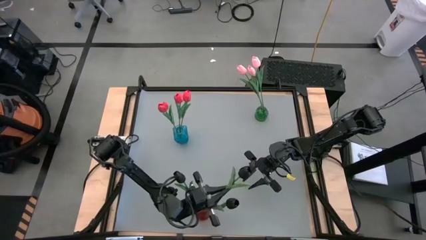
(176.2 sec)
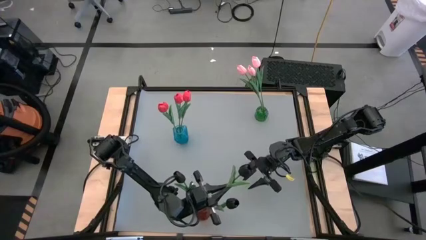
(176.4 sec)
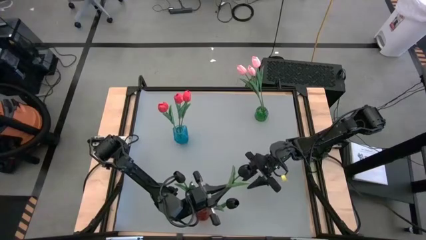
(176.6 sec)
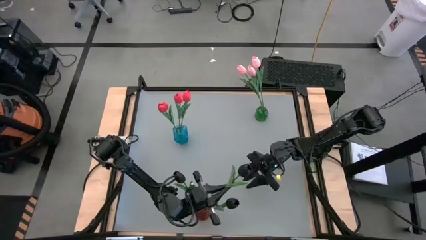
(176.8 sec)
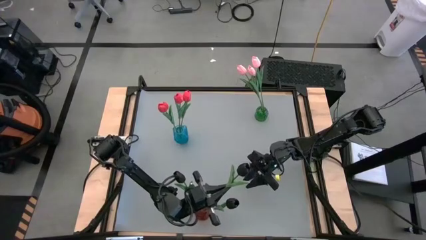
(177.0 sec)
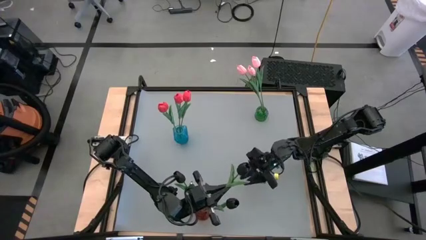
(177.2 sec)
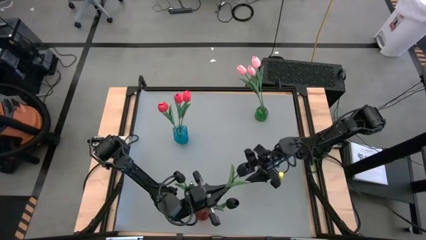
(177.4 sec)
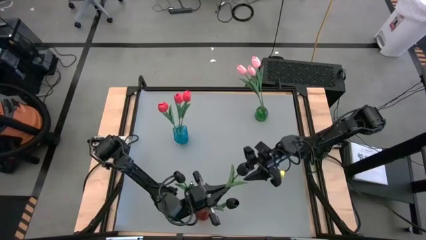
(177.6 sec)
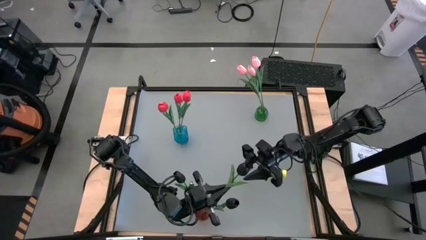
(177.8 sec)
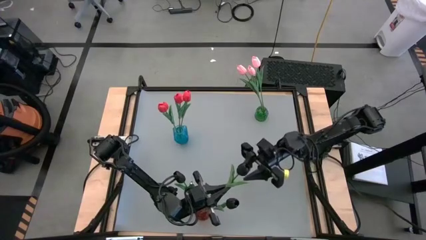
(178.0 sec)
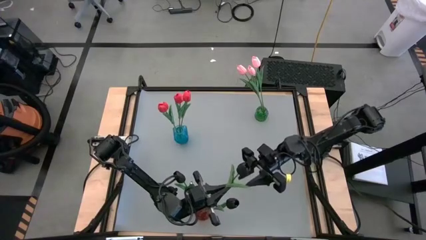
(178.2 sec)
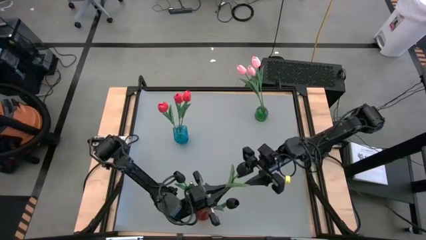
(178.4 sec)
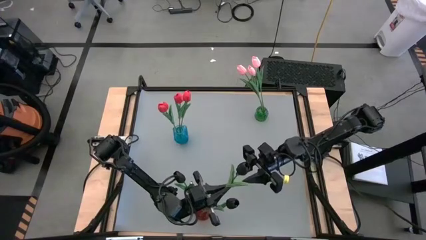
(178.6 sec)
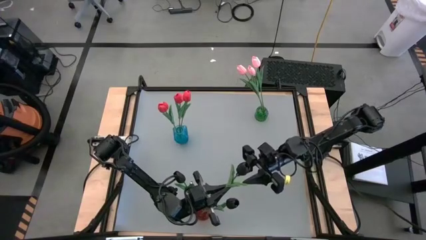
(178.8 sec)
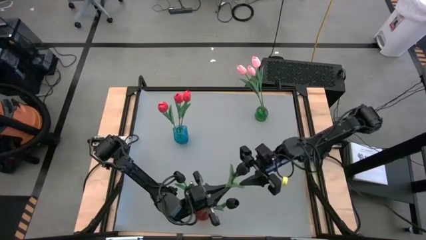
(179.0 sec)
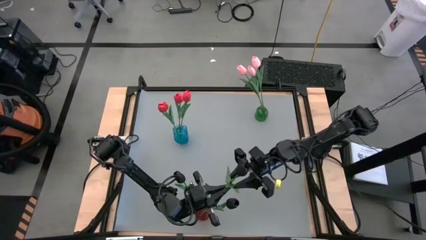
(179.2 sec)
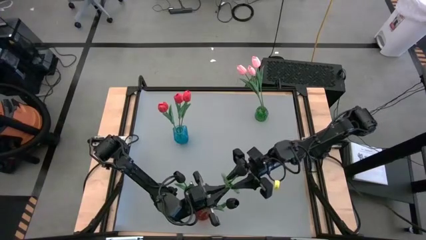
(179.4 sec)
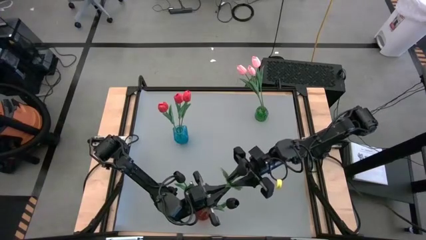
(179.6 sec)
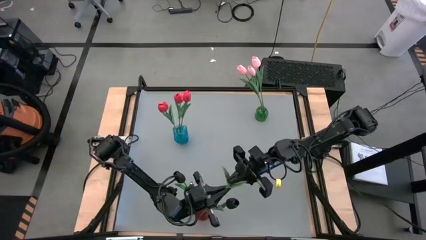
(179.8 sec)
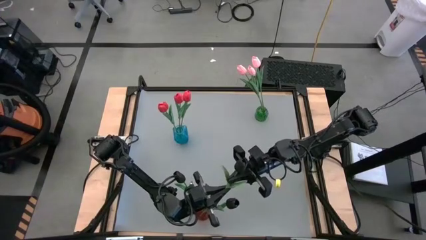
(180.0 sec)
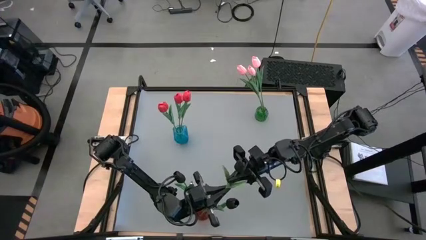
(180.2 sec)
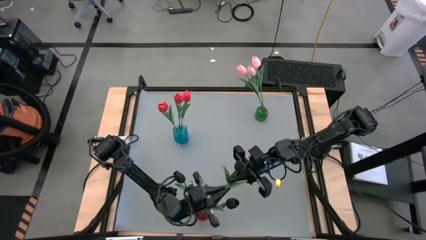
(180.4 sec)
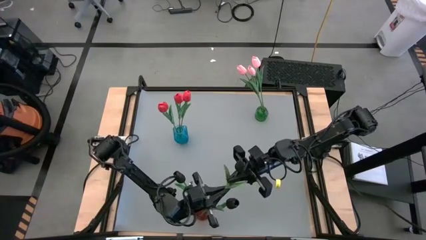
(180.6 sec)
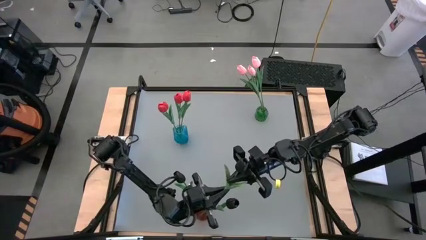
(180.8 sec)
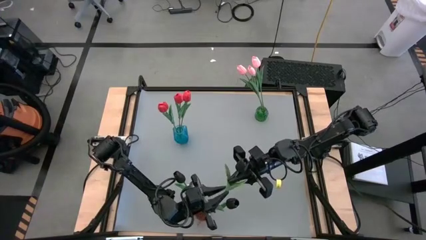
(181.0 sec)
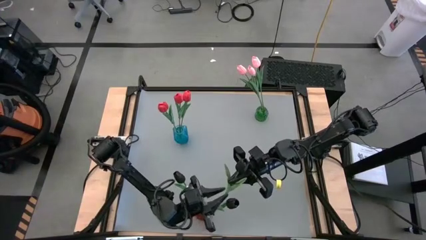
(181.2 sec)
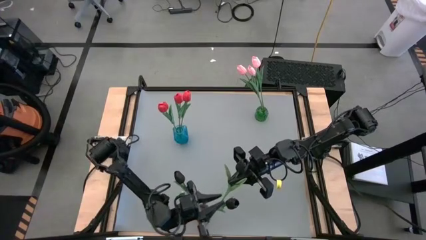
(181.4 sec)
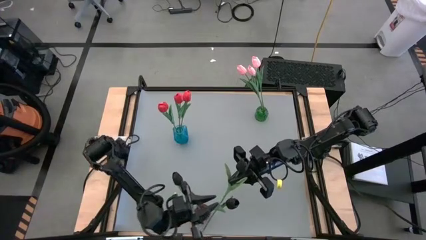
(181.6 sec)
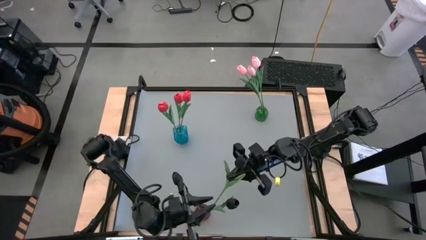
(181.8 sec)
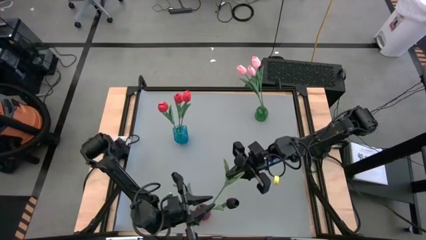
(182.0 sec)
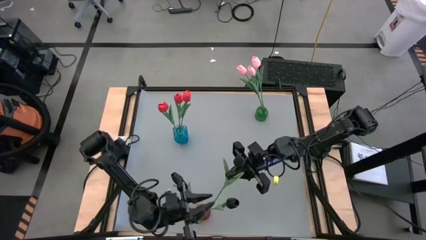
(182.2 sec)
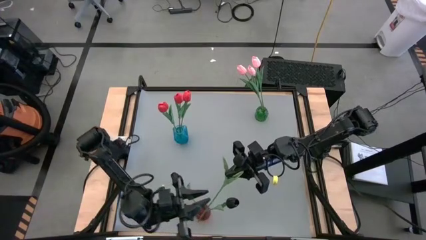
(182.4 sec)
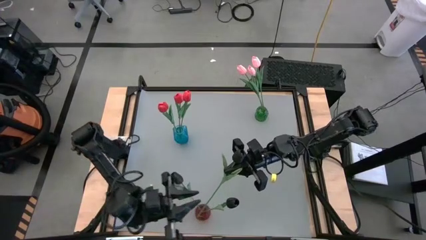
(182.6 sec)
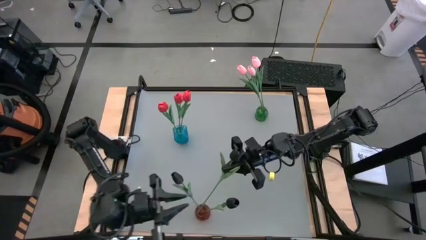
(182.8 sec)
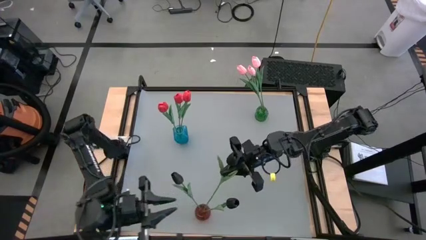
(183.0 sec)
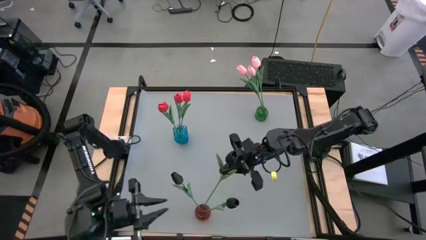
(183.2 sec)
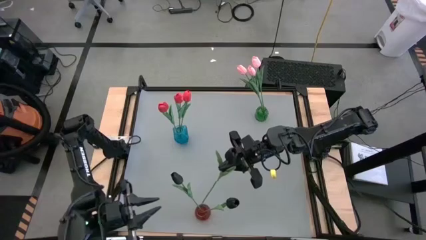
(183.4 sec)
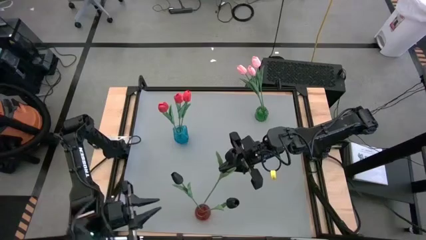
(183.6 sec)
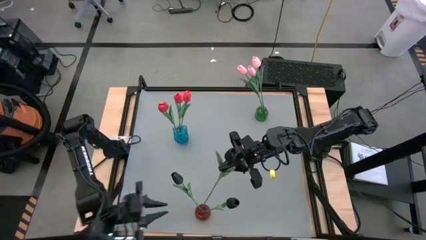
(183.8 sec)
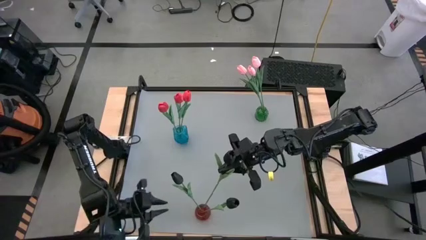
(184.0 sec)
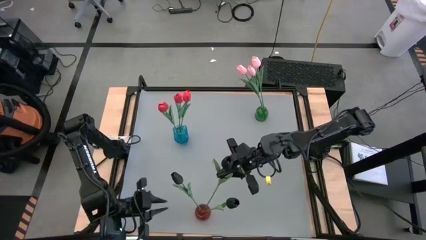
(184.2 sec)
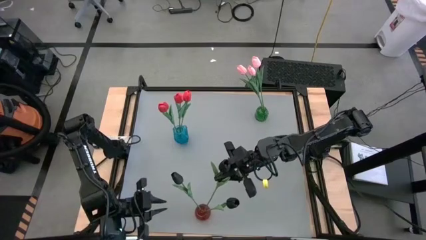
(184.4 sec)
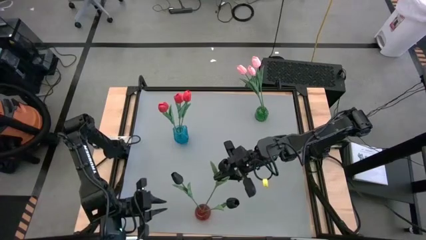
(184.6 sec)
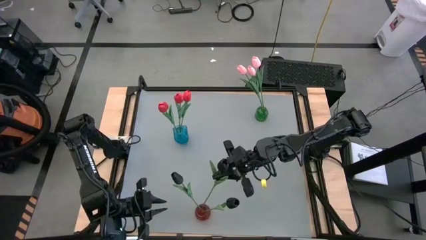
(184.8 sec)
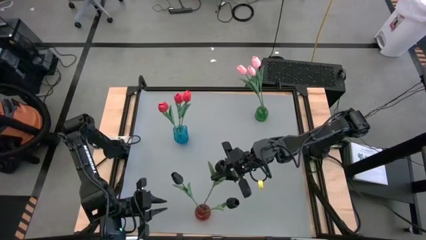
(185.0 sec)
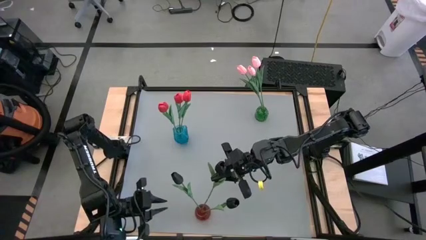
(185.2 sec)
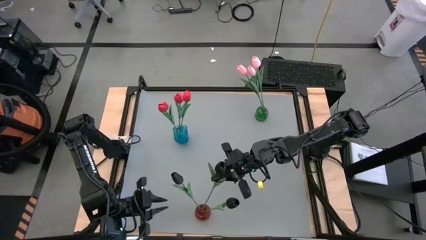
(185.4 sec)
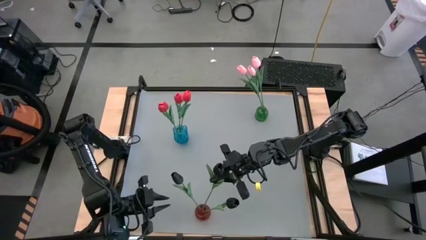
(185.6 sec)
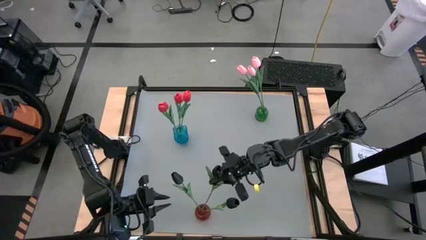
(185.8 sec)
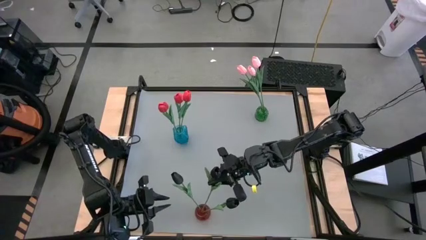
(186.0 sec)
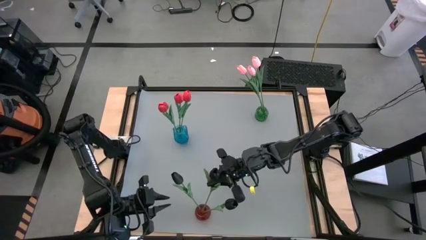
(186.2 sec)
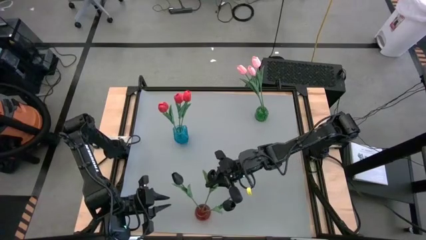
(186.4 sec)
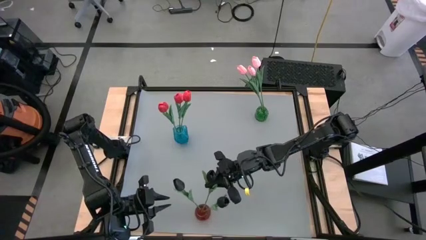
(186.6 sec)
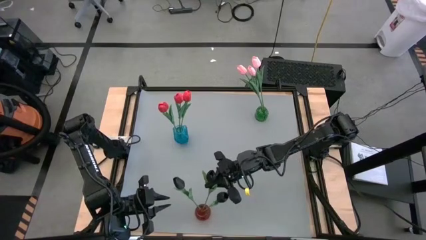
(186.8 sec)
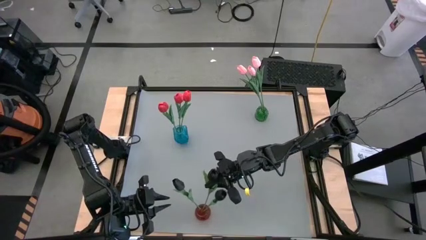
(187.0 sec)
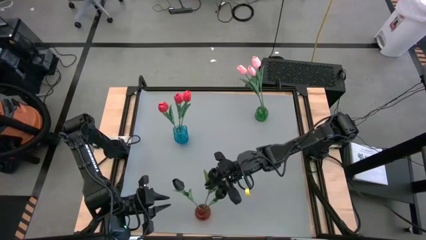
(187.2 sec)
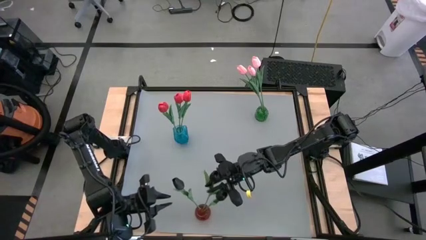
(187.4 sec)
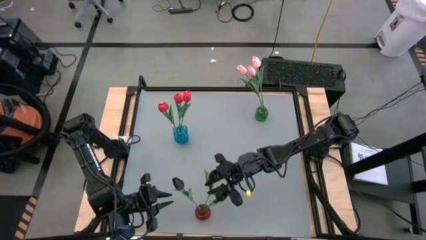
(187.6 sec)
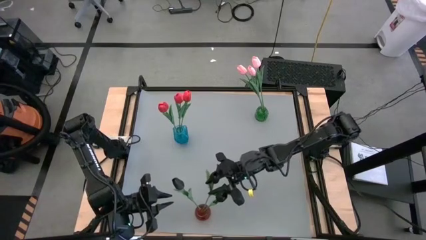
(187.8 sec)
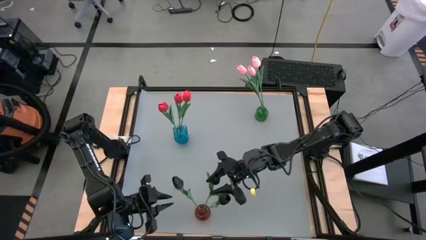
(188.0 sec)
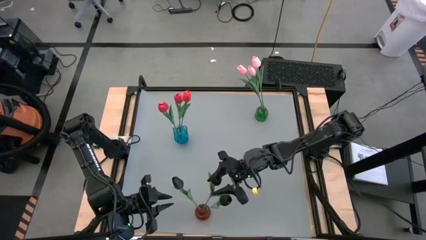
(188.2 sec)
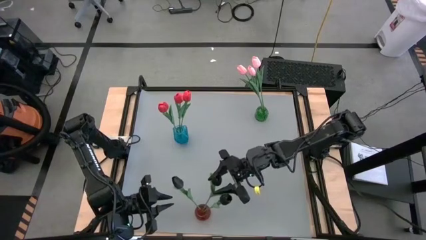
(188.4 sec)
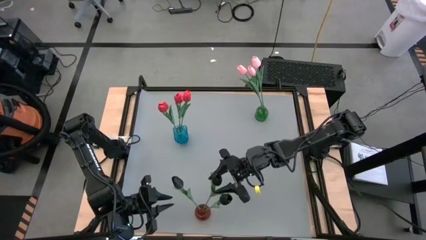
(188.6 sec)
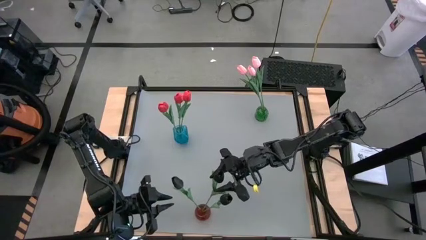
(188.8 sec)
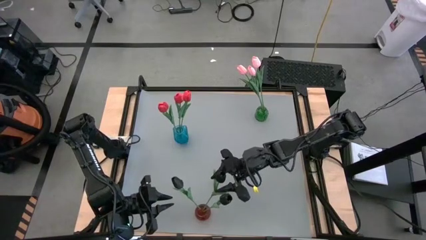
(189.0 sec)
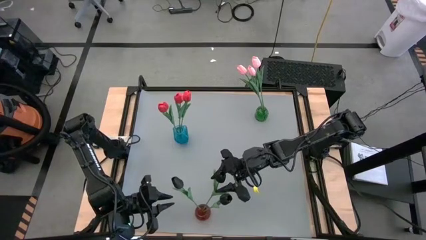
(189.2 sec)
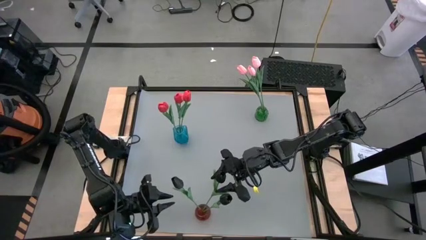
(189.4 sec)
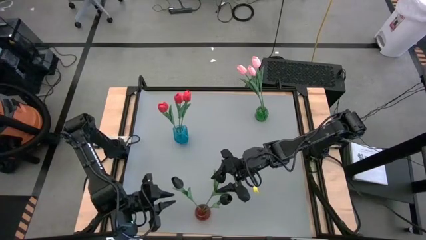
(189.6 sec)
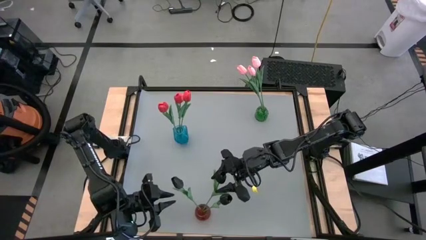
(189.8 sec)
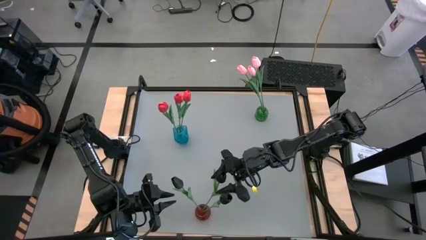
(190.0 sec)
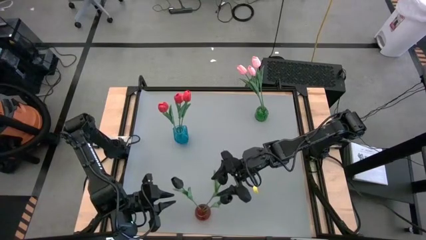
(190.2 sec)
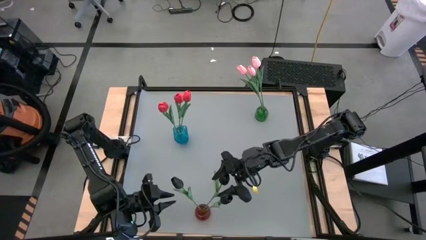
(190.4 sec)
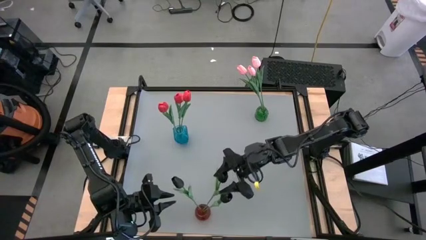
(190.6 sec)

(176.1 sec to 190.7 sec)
Task: Sort flowers into vase by color
Put the black flower into the red vase

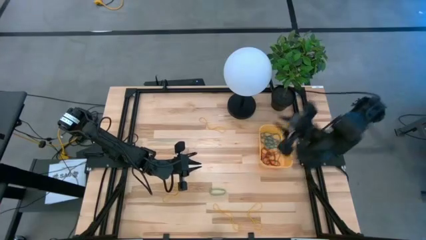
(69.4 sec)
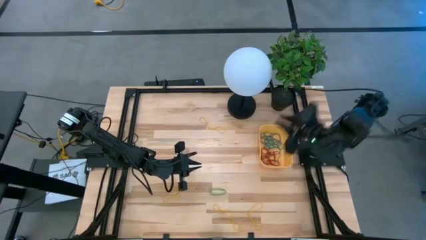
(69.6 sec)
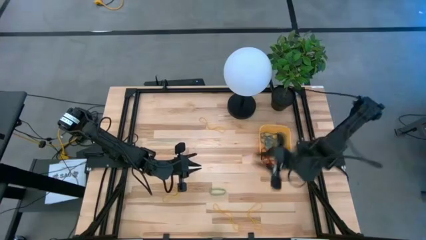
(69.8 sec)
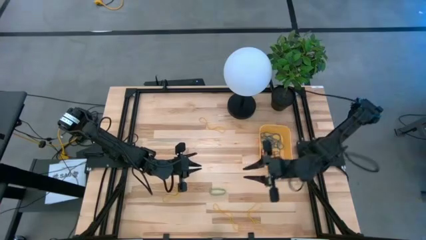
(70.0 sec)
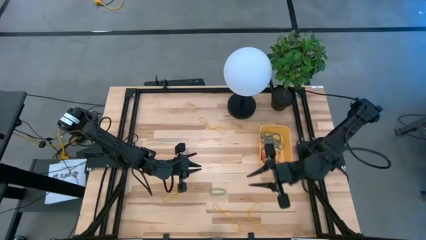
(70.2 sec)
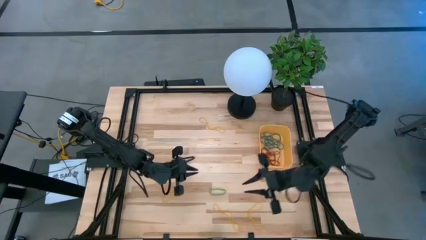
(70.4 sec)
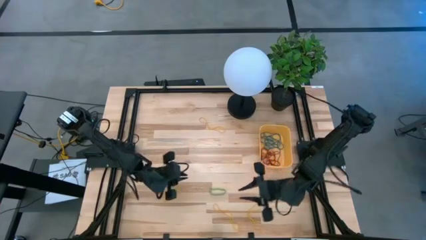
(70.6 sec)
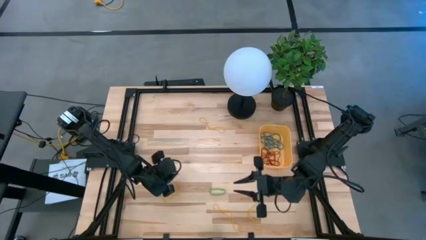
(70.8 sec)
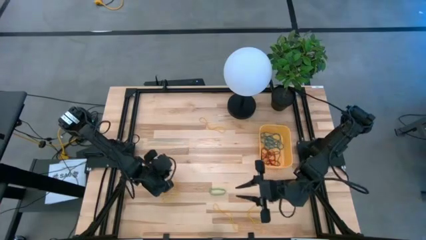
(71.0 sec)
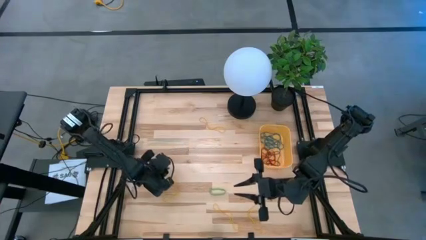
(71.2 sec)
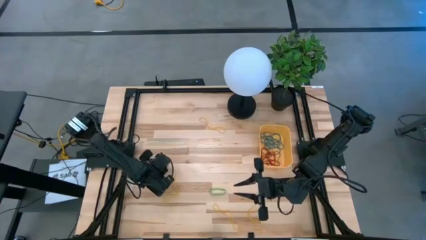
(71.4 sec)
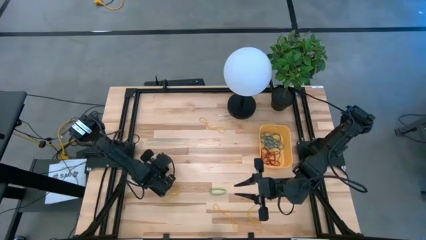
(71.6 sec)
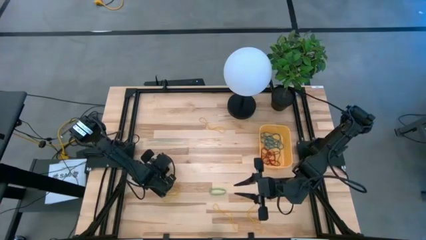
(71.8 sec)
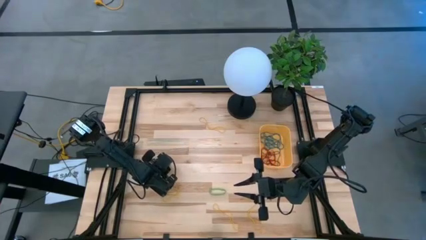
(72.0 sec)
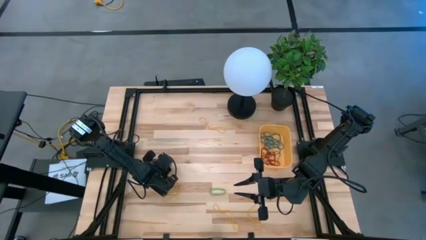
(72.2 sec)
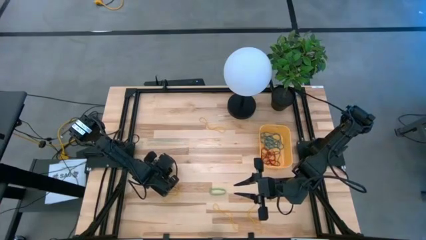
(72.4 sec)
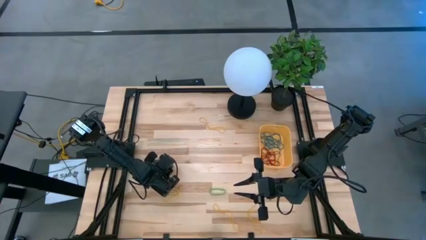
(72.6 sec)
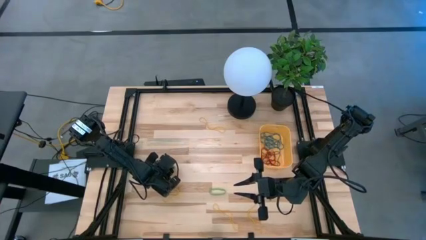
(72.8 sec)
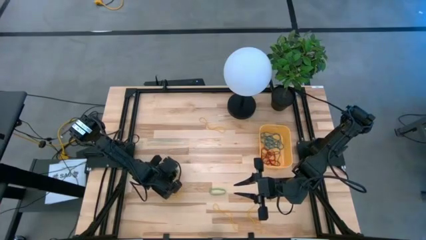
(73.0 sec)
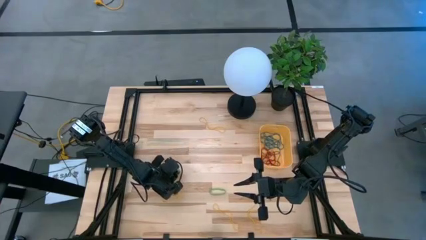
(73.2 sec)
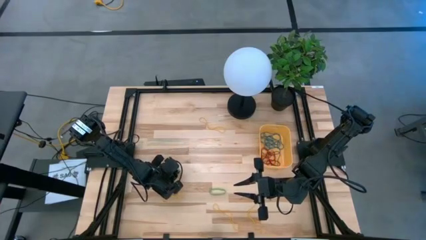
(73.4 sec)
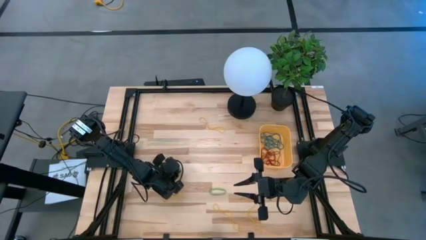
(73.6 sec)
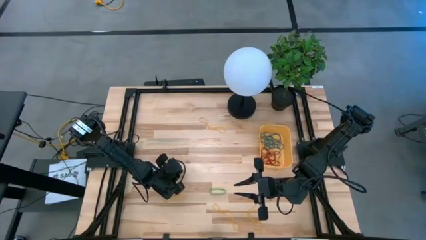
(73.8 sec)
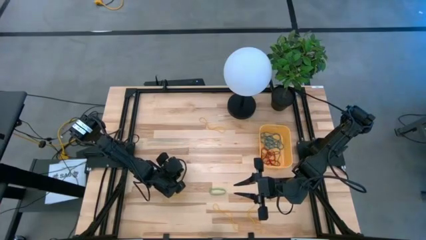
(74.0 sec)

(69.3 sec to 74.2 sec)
Task: Pick and place items into bin
Put the green rubber band into the bin
